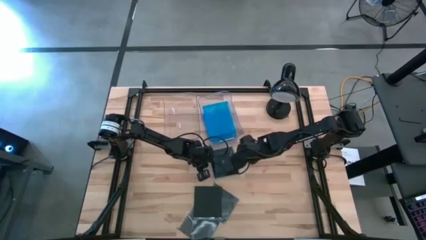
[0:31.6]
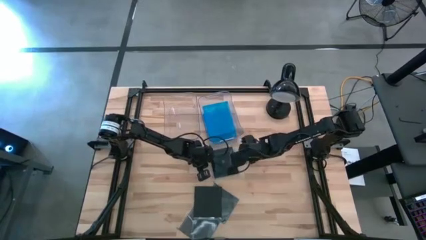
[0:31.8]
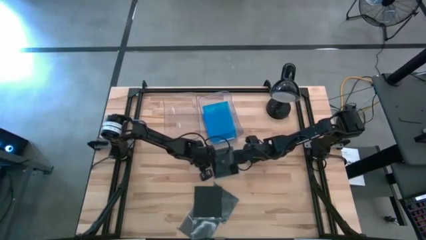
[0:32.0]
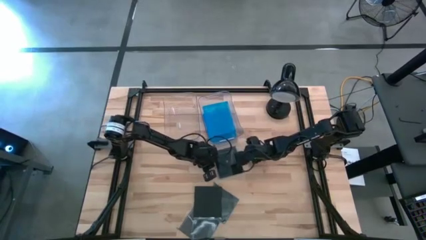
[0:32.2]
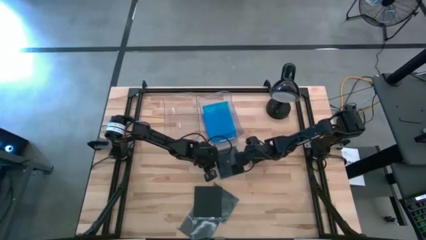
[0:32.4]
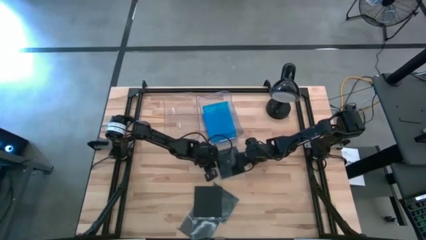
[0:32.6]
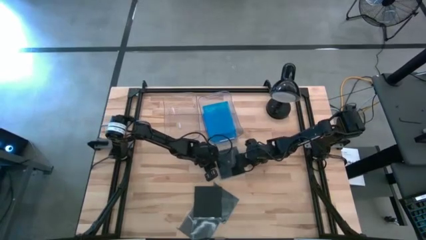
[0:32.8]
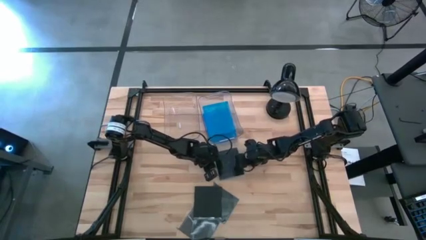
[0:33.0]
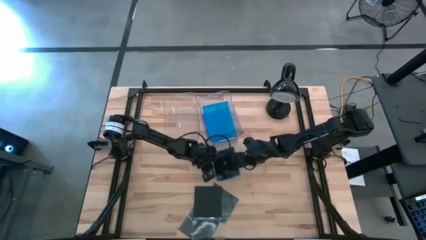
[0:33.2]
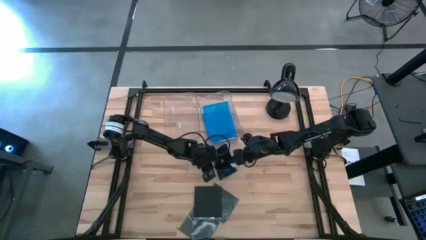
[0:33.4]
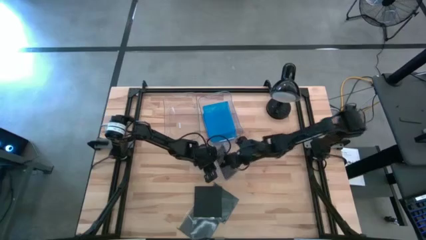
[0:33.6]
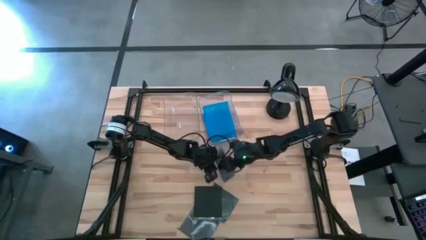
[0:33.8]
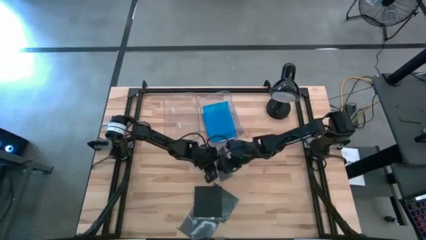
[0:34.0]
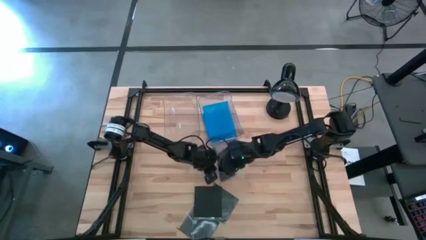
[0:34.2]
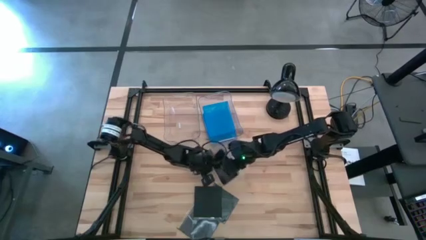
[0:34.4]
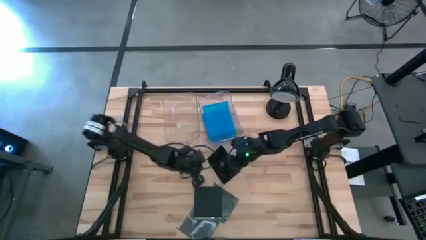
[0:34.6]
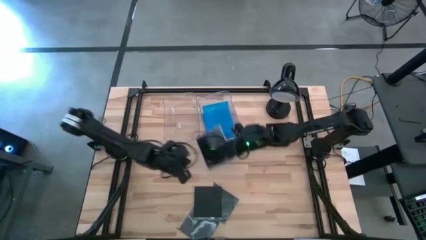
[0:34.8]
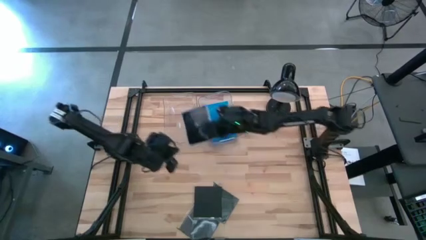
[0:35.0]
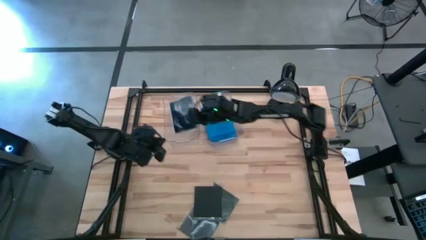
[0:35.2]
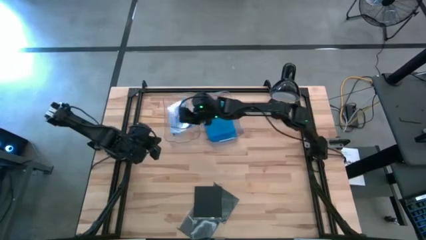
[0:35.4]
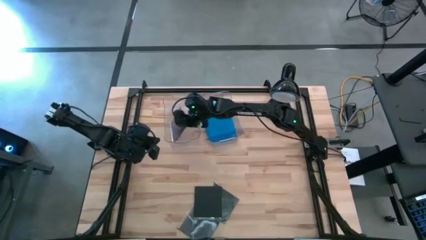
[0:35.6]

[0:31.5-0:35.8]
Task: Pick & place jewel cases by type
Put the black CD case into the left transparent bin

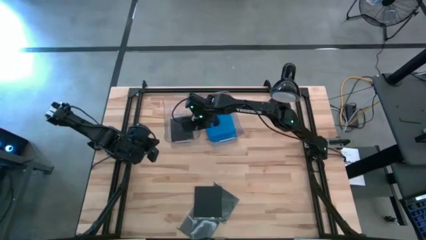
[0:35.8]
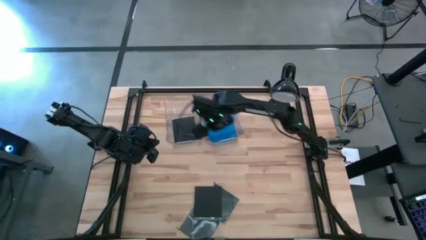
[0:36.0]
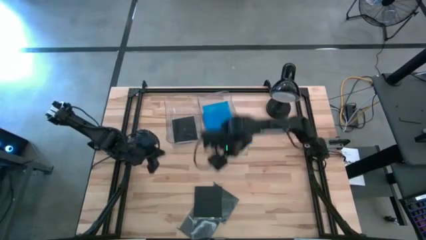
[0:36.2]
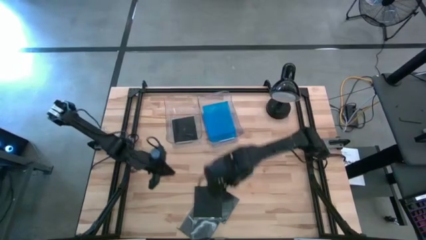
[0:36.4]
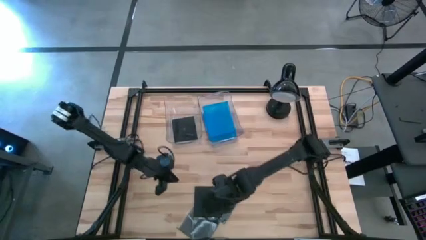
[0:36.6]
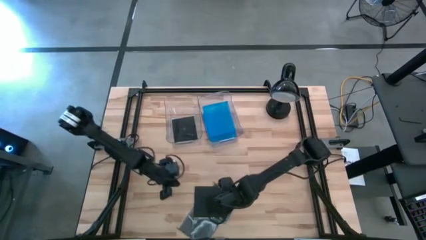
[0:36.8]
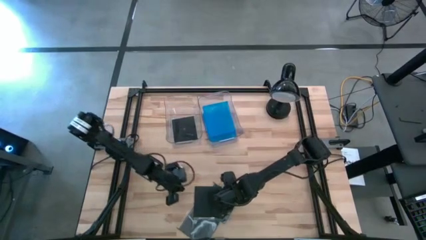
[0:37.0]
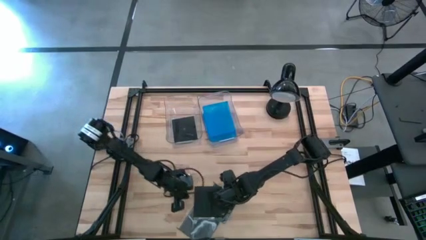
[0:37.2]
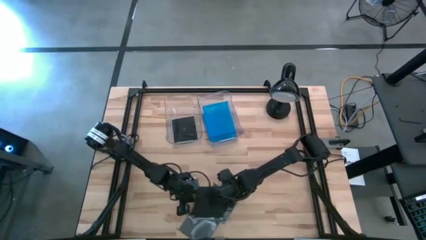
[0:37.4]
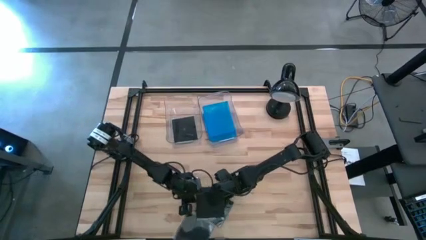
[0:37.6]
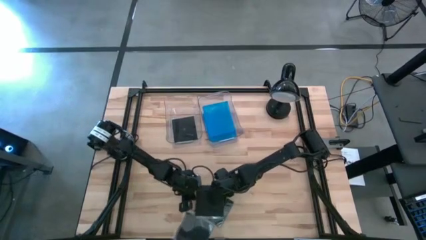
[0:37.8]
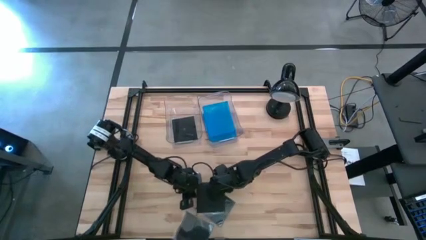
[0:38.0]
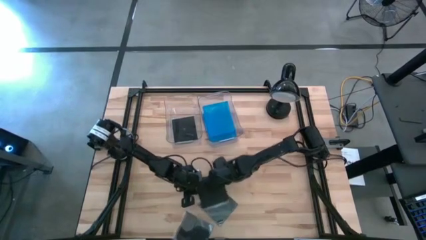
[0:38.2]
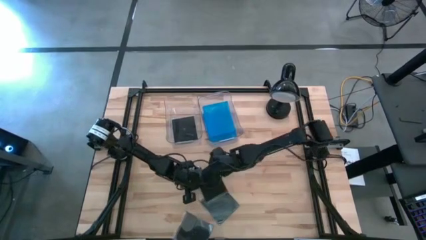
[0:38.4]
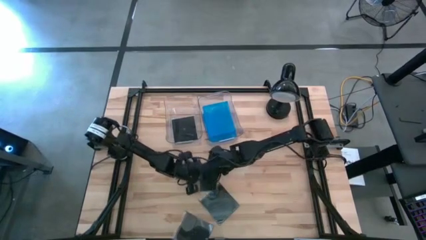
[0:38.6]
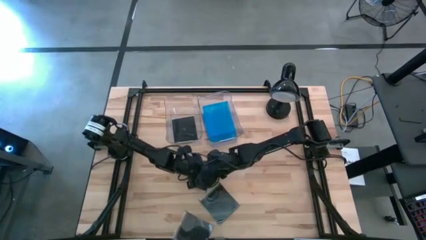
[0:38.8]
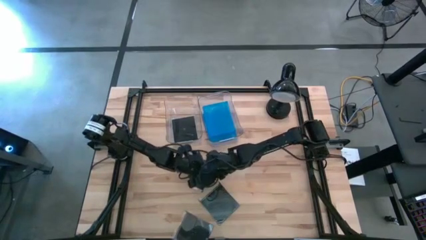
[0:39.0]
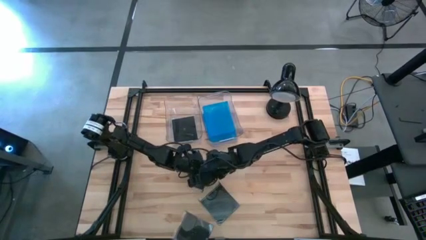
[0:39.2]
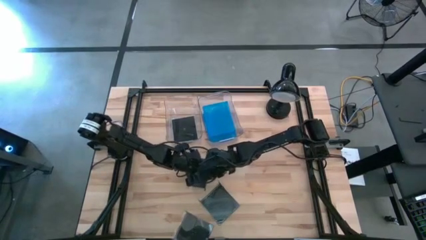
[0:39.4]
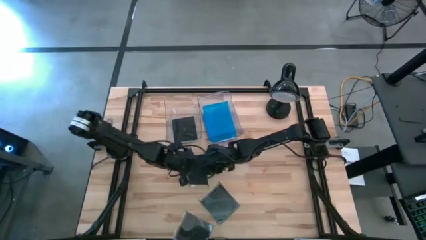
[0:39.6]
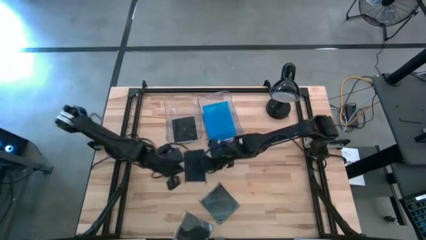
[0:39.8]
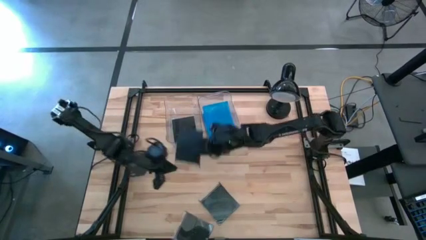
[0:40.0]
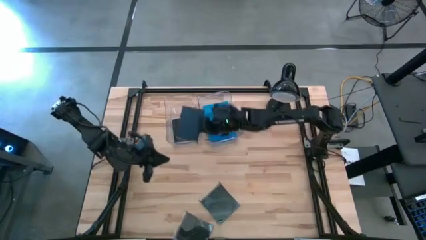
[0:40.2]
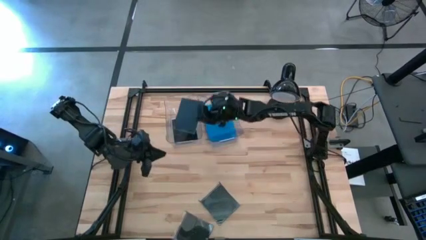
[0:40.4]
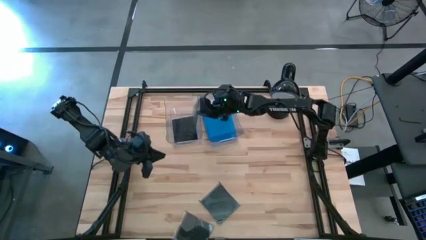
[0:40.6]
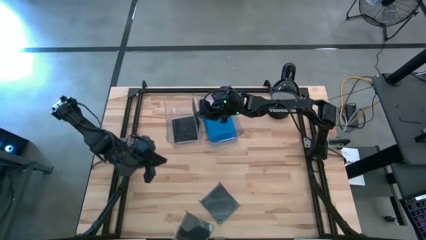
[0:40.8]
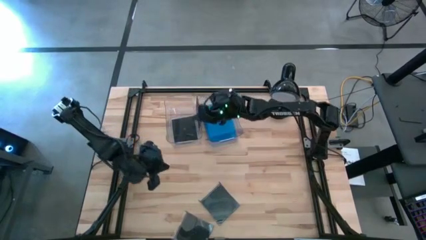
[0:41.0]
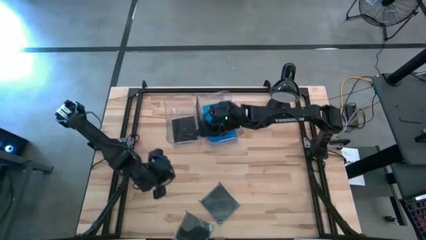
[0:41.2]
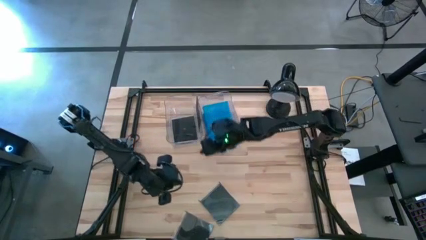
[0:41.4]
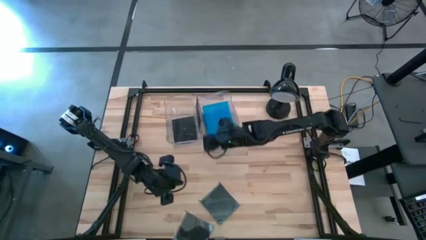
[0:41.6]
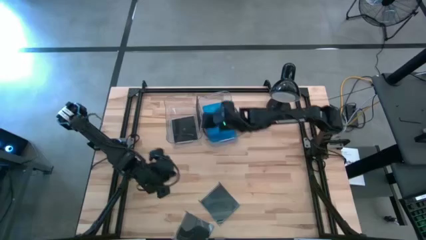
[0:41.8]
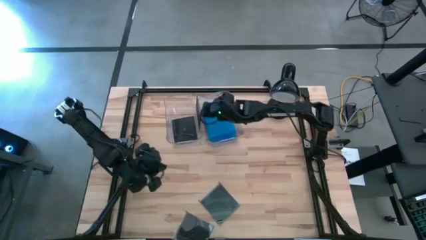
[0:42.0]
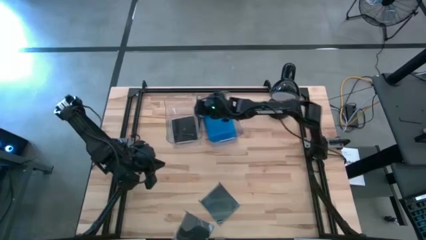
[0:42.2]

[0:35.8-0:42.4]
Put the black CD case into the left transparent bin

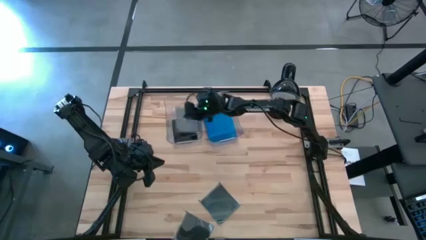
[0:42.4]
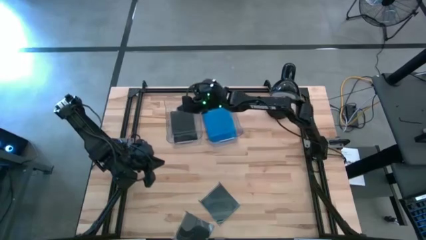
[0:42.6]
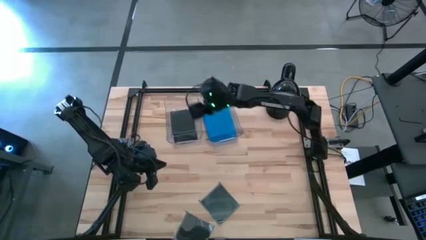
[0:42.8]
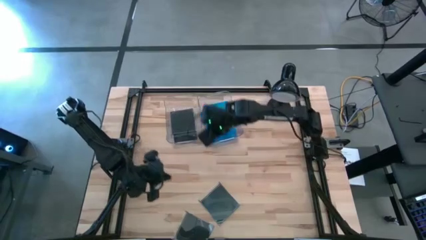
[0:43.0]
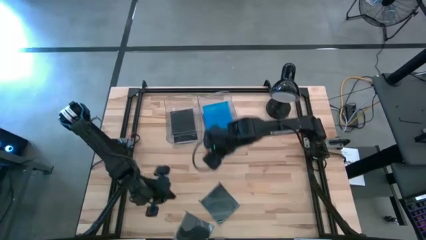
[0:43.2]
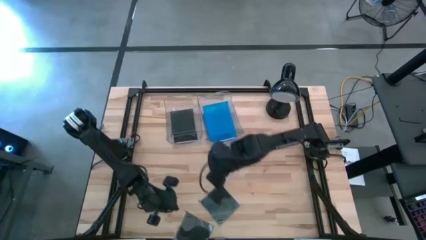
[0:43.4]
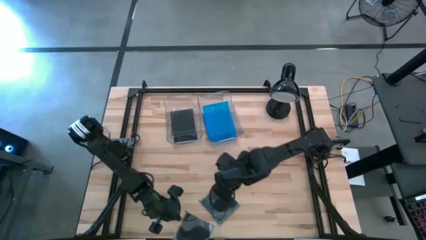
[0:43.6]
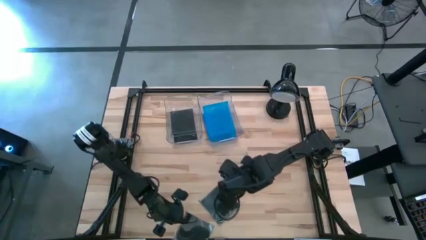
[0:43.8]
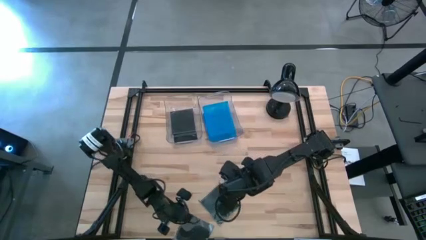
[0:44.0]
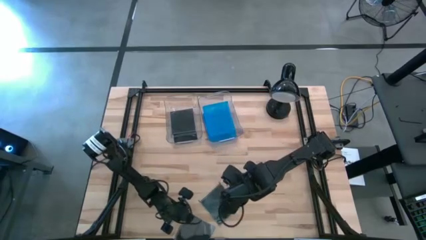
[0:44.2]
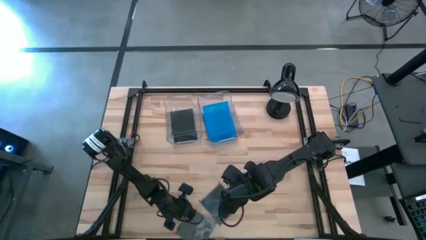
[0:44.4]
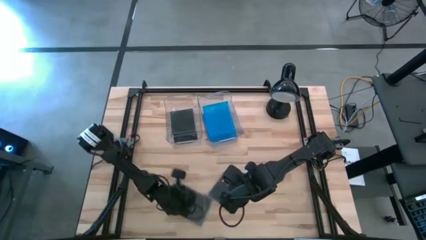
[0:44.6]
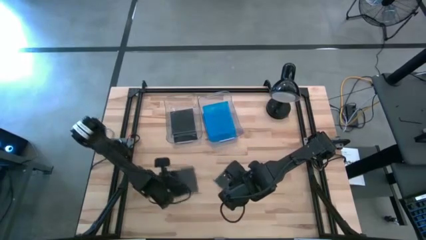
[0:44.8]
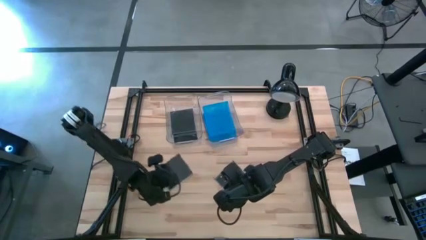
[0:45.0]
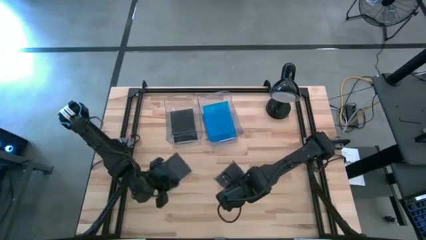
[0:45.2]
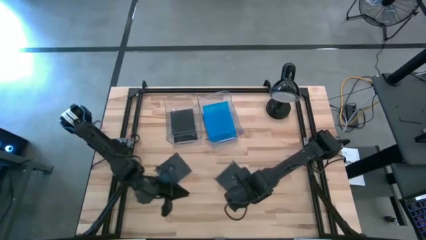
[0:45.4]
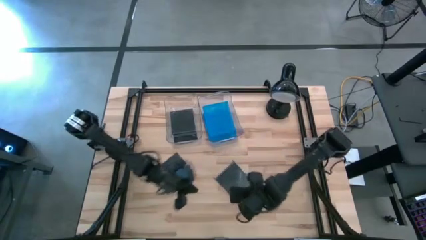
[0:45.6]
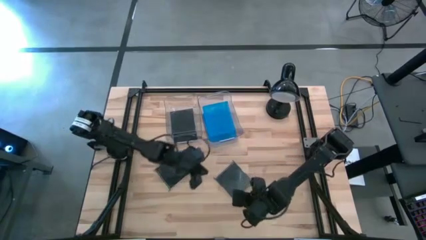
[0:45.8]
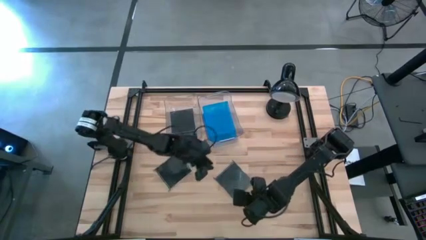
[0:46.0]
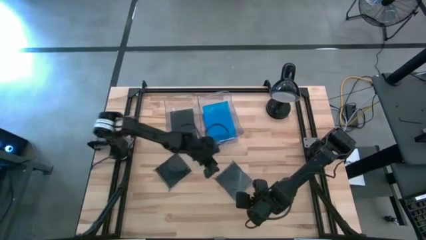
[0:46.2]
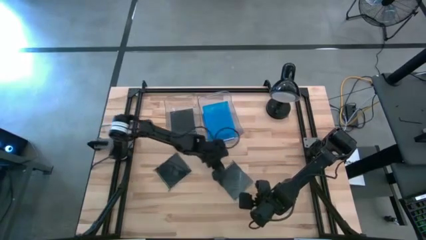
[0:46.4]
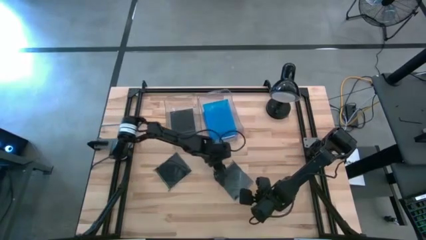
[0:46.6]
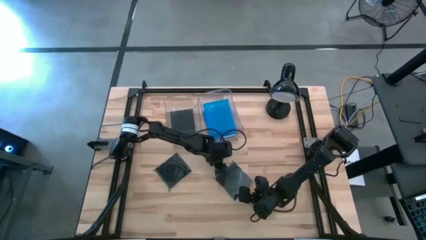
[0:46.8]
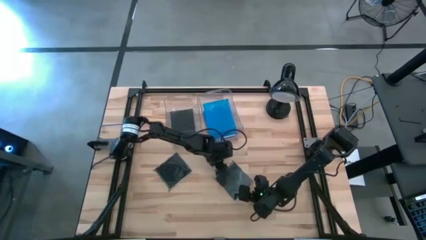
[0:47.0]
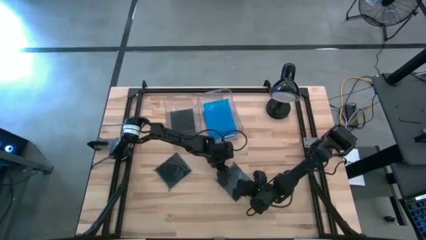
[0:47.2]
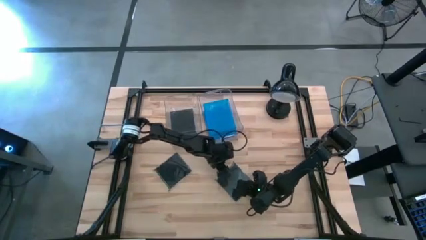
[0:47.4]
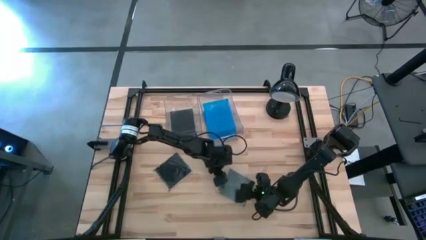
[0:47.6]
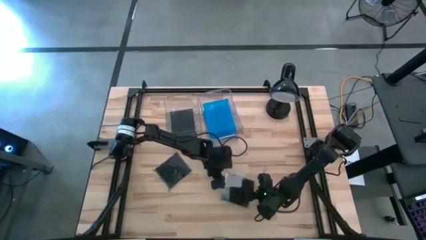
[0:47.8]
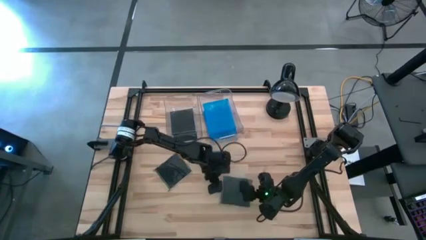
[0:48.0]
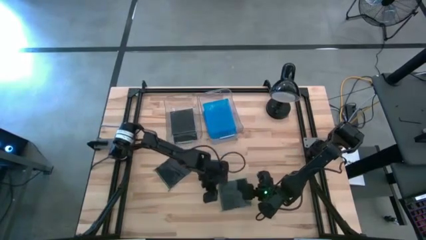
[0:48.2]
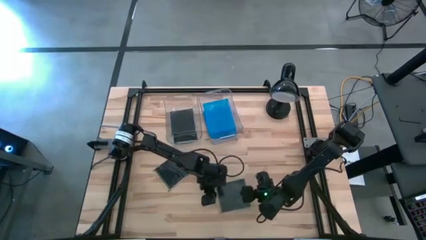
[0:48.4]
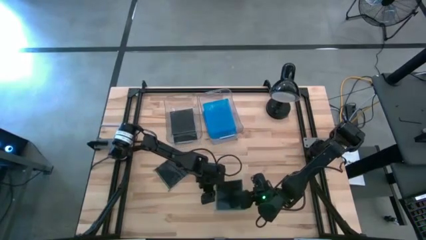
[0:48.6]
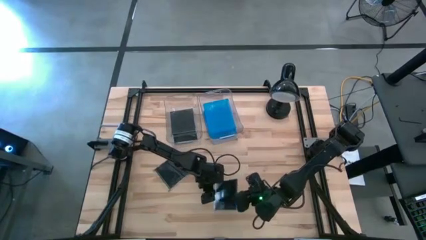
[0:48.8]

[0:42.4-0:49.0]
Put the black CD case into the left transparent bin
